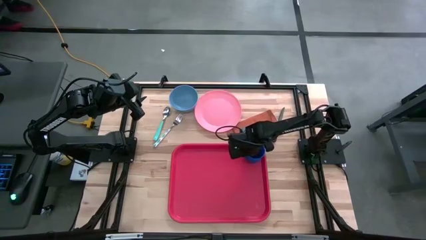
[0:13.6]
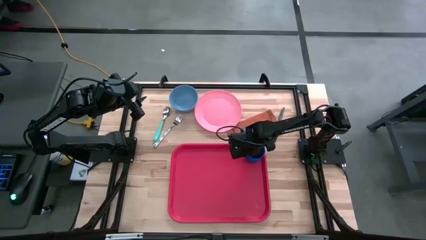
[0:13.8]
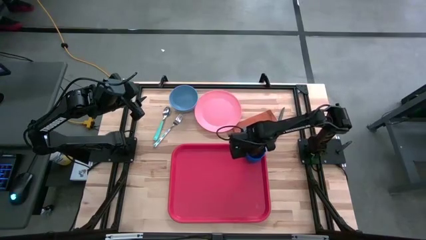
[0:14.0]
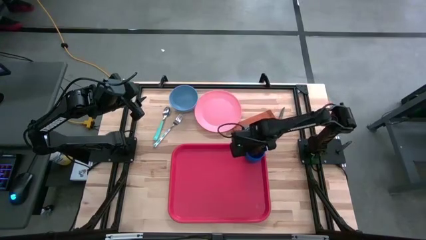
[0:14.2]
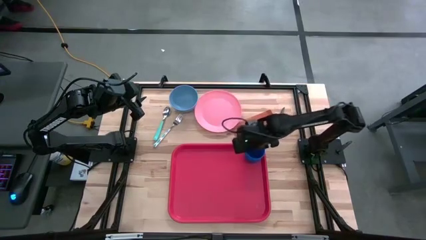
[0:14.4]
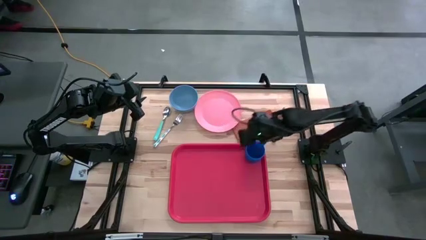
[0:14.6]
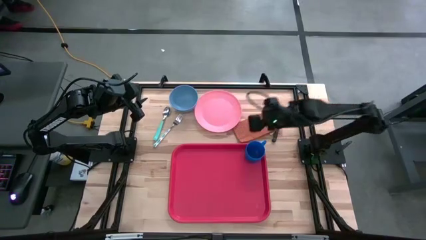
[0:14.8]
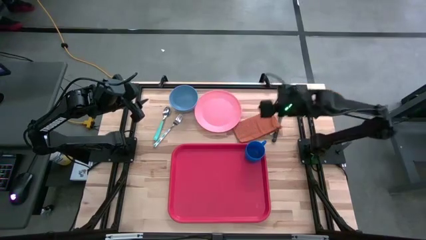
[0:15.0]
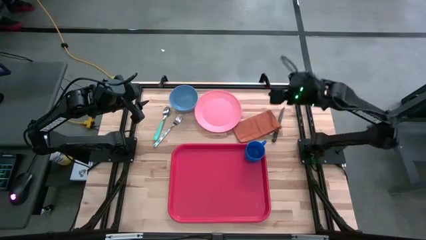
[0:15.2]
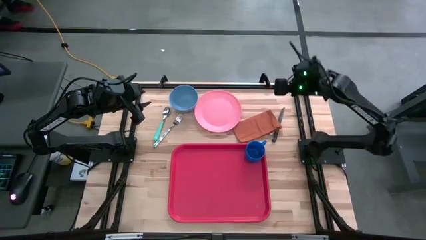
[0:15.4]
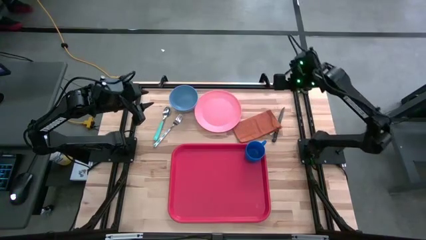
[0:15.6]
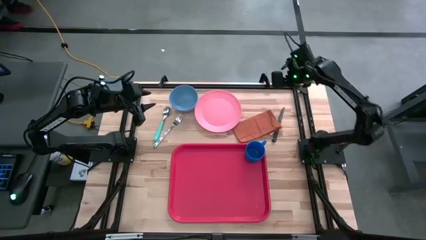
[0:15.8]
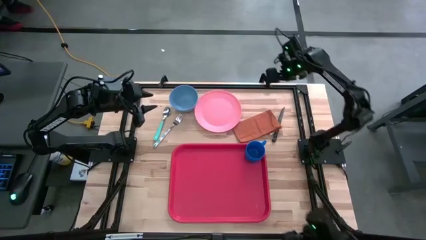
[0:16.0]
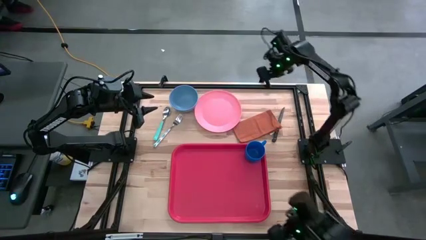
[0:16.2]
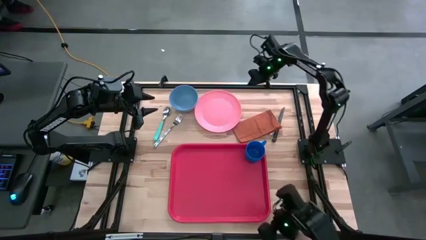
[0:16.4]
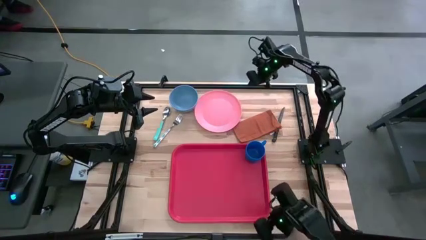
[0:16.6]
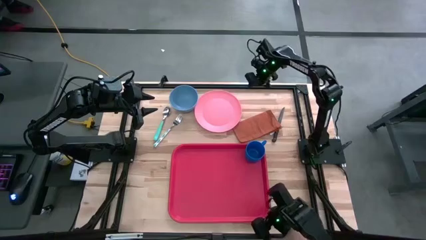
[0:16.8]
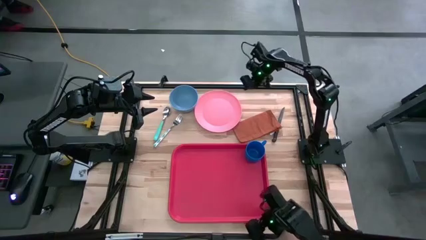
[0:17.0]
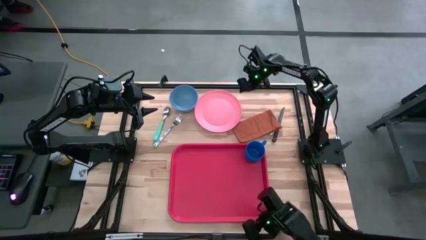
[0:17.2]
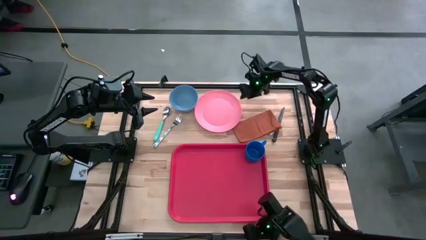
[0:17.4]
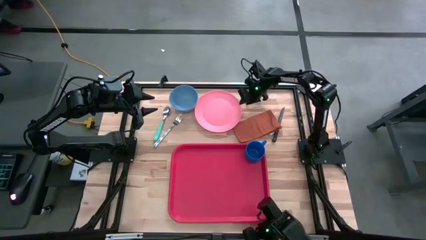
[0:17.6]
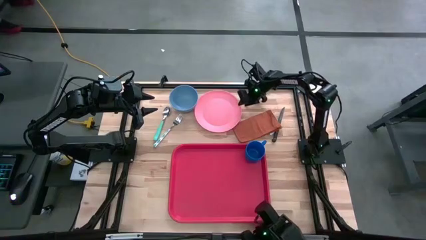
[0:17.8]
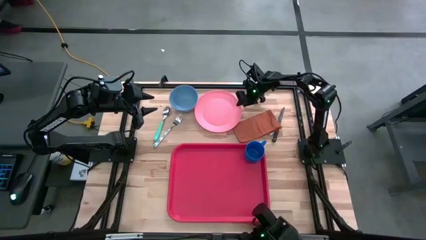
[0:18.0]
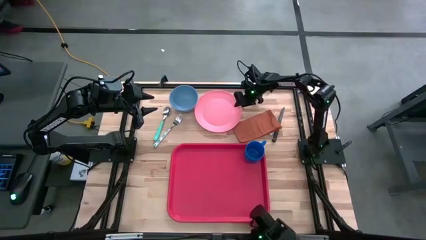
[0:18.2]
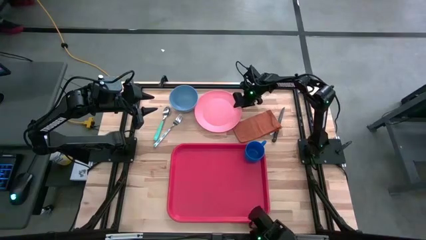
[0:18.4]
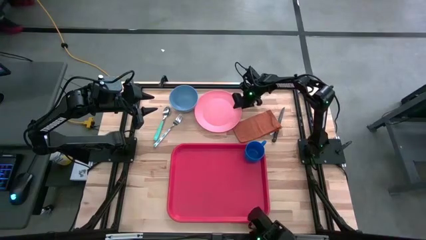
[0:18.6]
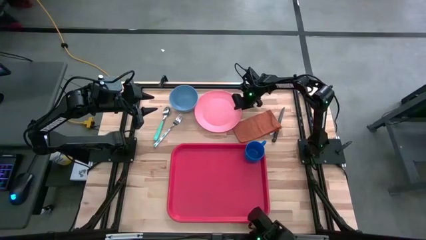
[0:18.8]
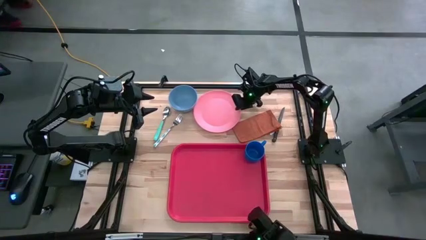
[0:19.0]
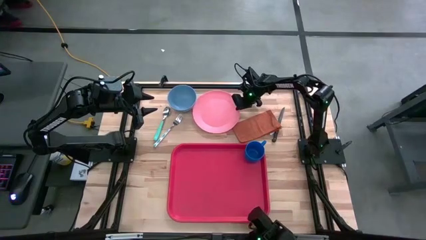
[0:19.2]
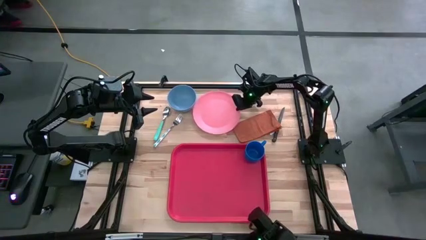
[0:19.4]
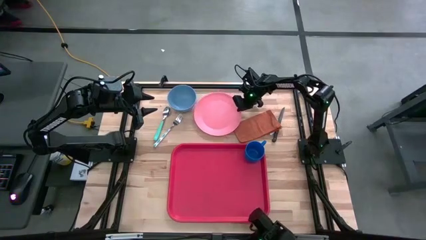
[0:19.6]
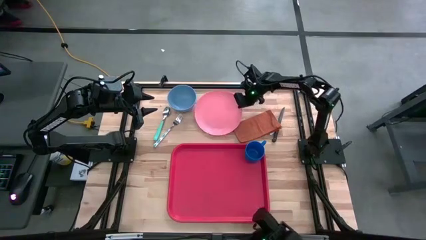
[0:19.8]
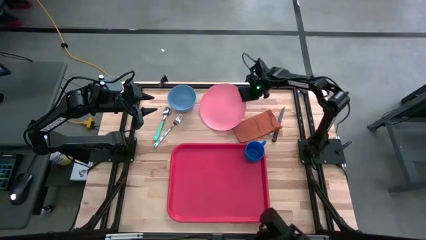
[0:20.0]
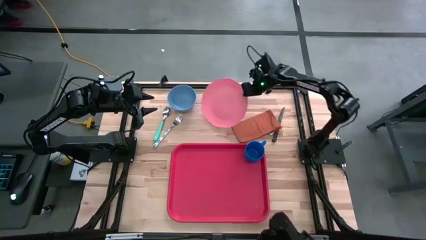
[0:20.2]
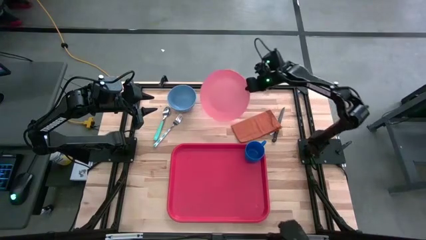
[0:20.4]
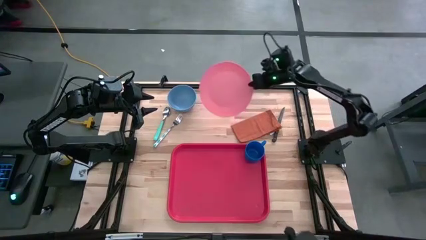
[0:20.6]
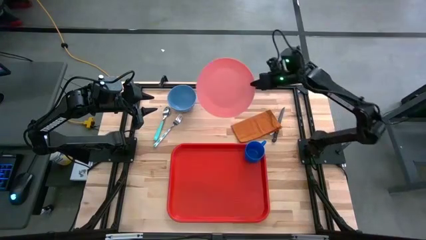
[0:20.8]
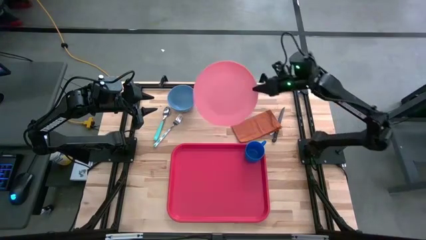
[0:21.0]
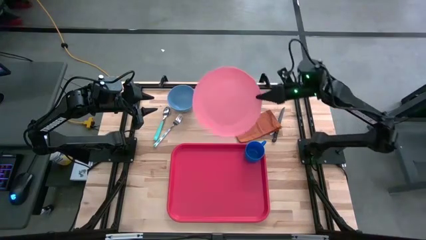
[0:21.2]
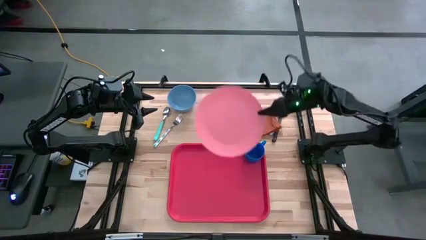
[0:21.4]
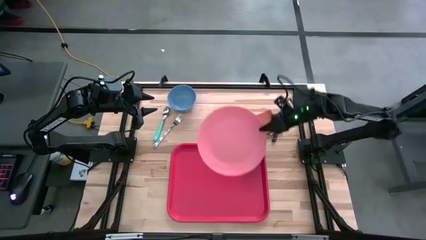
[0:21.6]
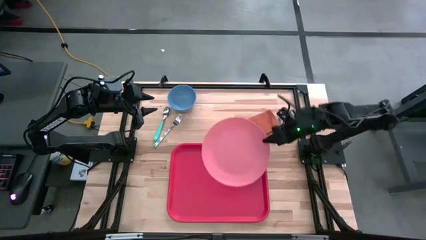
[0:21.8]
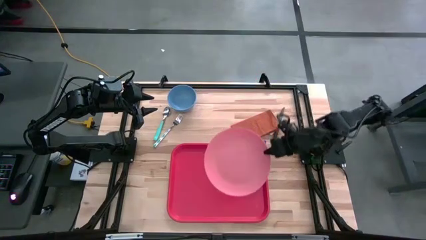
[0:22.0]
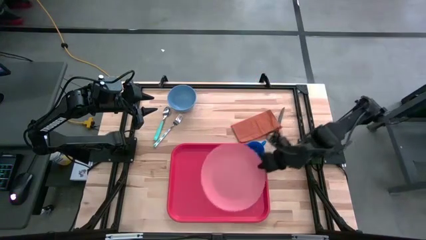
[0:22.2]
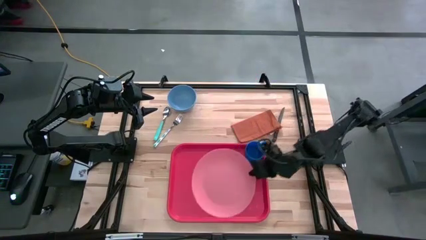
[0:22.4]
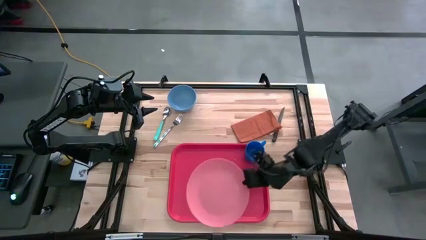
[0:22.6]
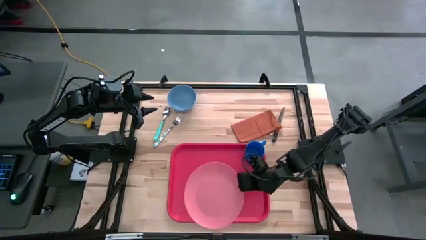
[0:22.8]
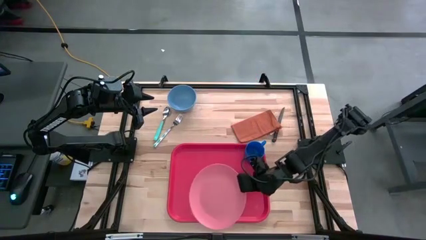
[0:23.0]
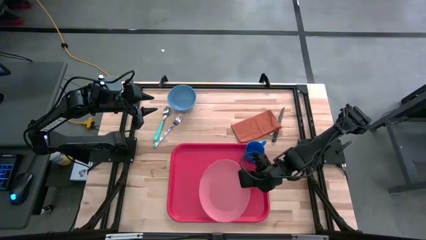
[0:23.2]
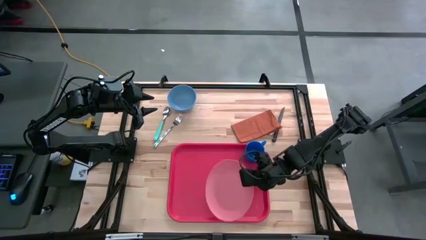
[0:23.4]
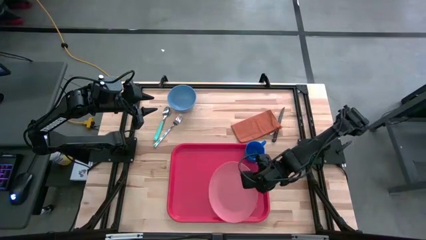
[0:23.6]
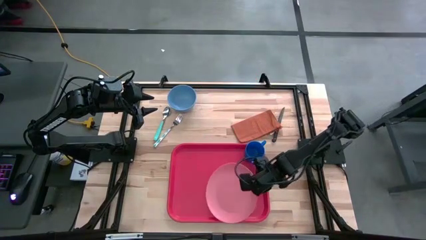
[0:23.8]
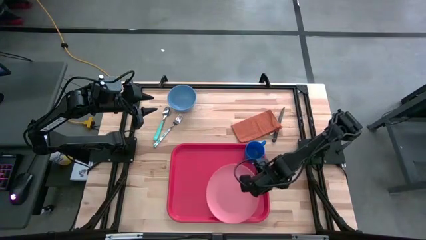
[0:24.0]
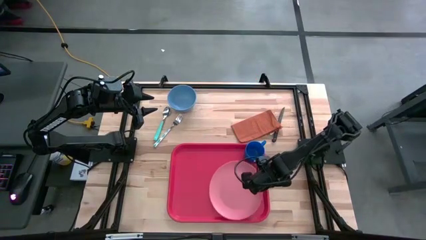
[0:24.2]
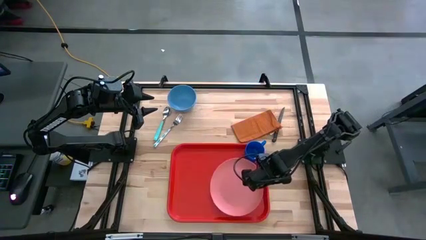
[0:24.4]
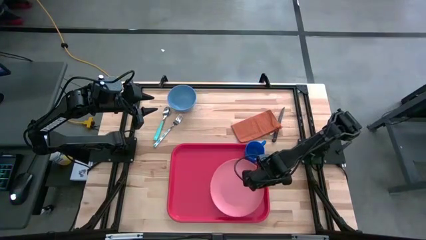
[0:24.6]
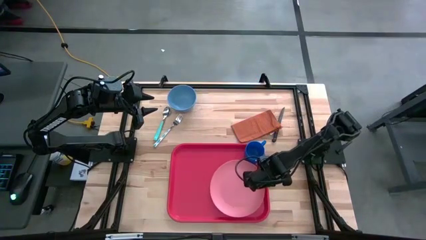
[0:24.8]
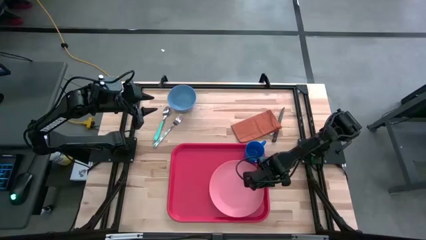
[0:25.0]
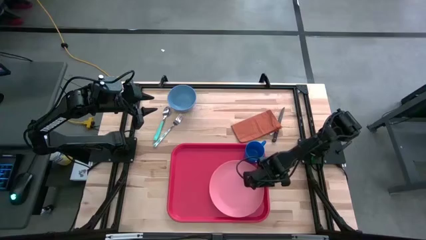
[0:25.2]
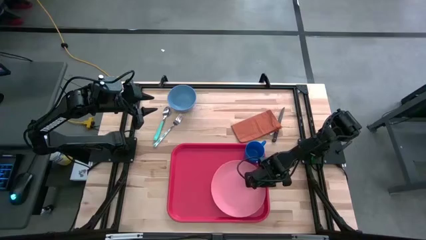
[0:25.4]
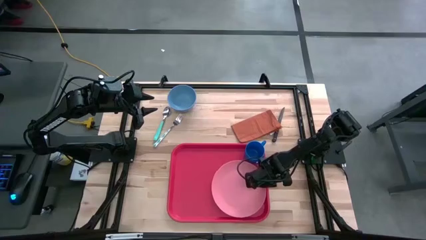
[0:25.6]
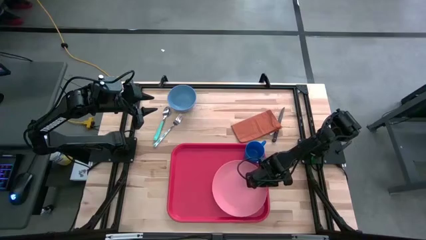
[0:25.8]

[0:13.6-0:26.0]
Task: Set up tray
Put the pink plate on the bottom left of the blue mug
